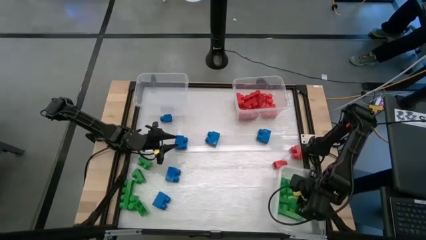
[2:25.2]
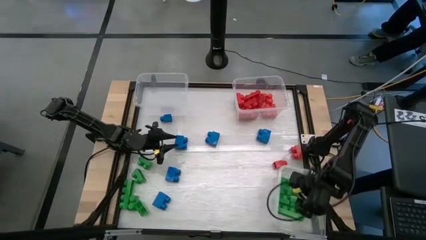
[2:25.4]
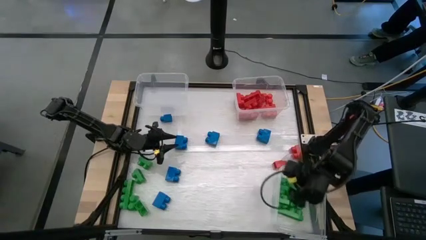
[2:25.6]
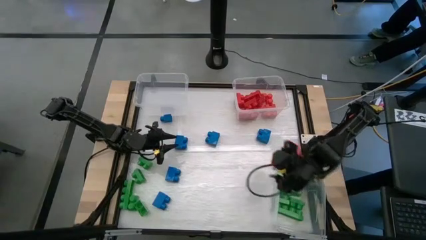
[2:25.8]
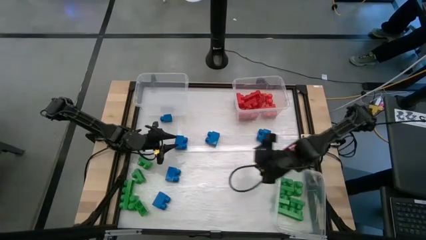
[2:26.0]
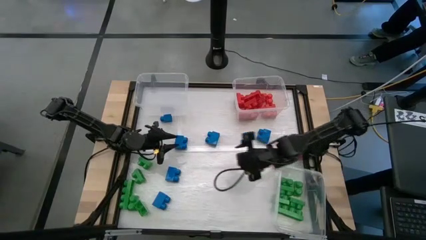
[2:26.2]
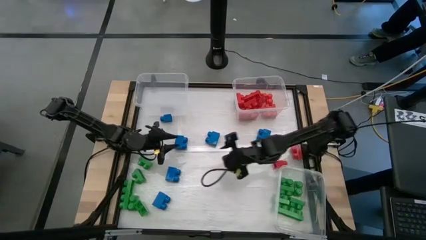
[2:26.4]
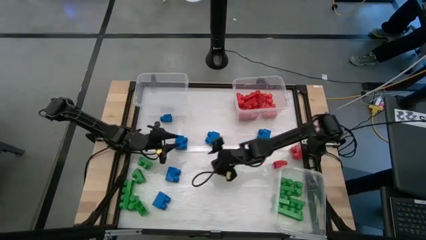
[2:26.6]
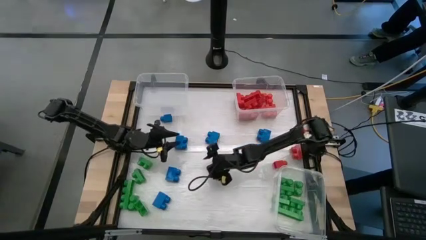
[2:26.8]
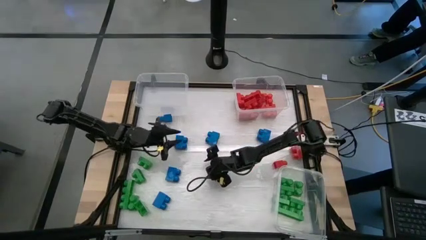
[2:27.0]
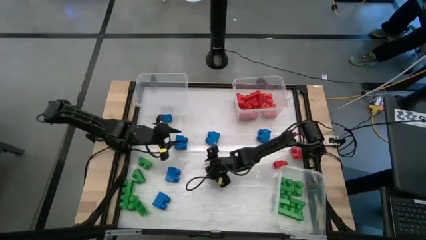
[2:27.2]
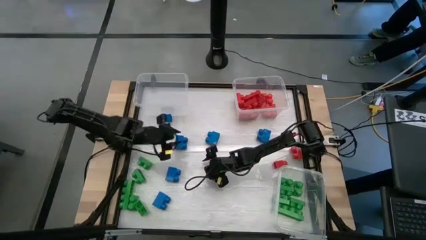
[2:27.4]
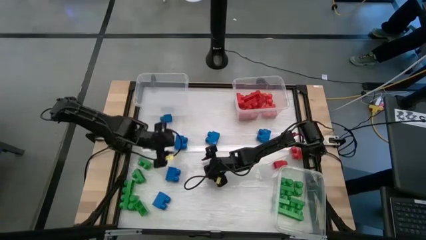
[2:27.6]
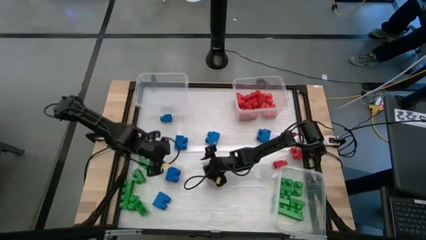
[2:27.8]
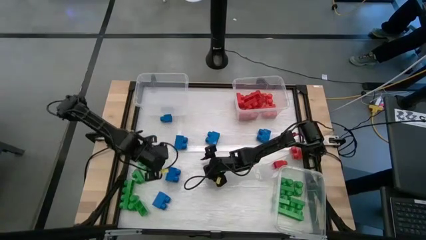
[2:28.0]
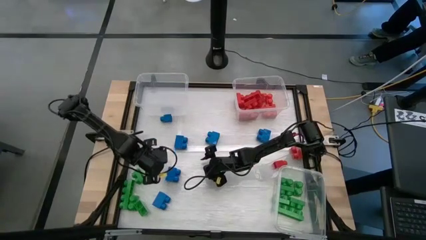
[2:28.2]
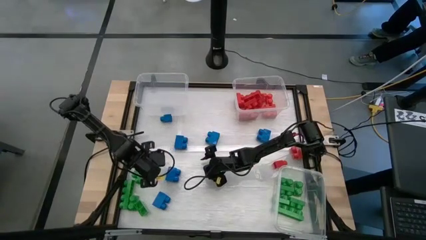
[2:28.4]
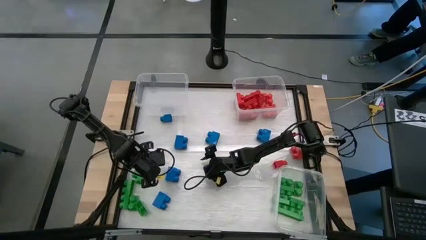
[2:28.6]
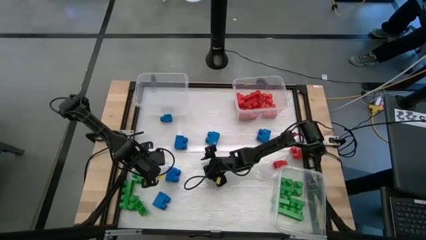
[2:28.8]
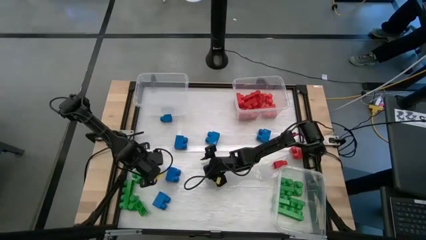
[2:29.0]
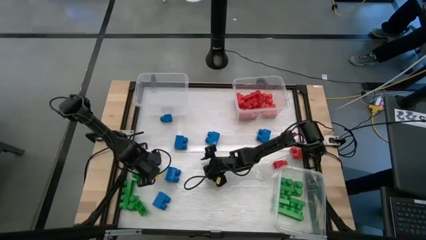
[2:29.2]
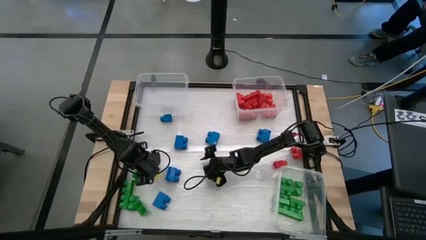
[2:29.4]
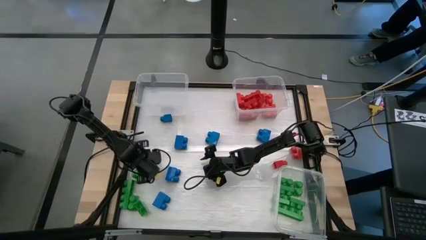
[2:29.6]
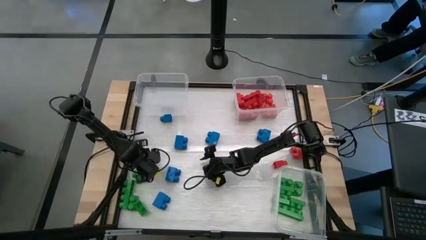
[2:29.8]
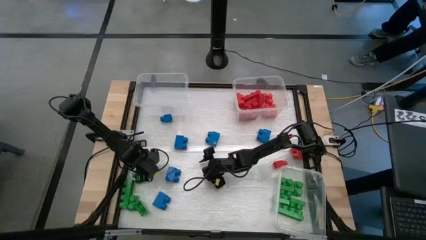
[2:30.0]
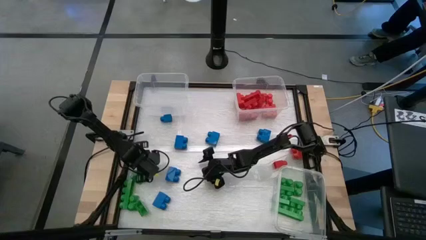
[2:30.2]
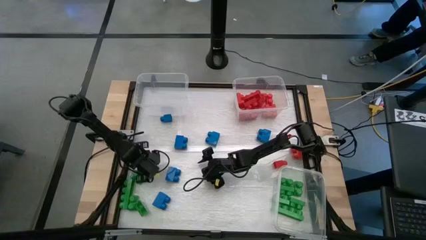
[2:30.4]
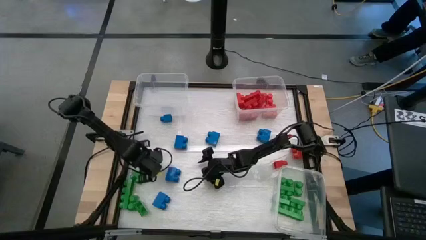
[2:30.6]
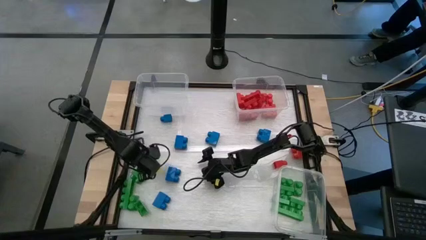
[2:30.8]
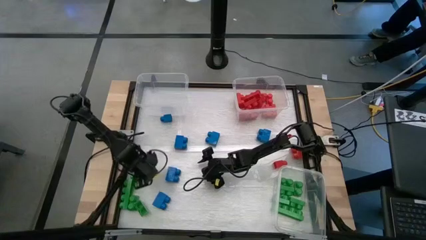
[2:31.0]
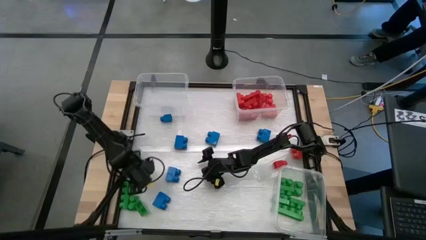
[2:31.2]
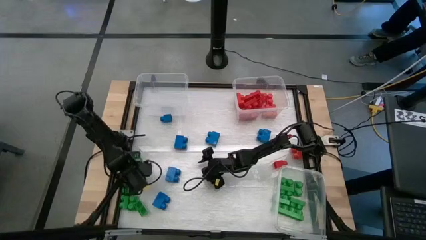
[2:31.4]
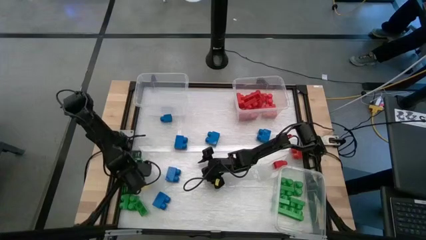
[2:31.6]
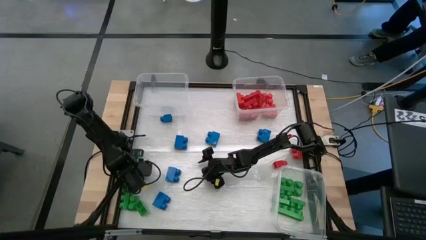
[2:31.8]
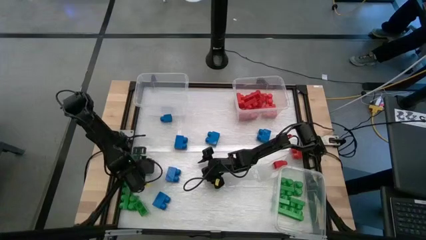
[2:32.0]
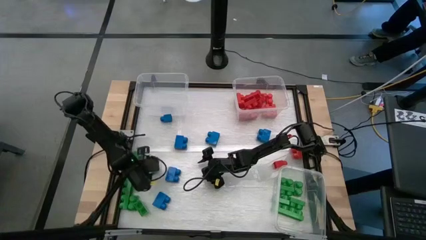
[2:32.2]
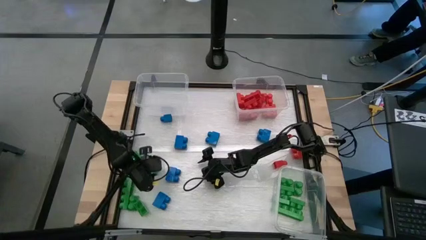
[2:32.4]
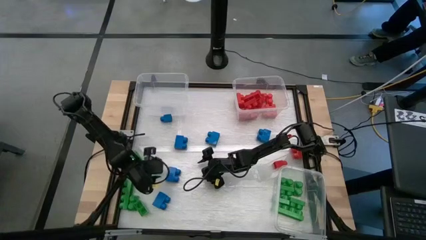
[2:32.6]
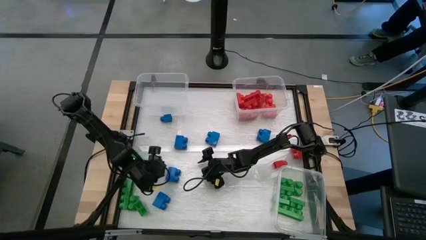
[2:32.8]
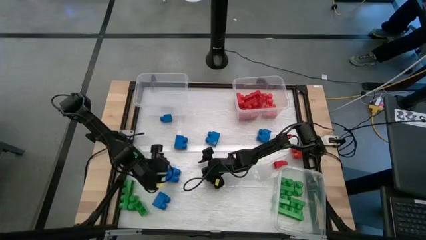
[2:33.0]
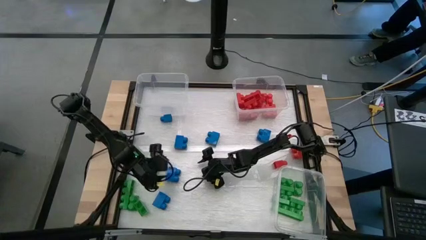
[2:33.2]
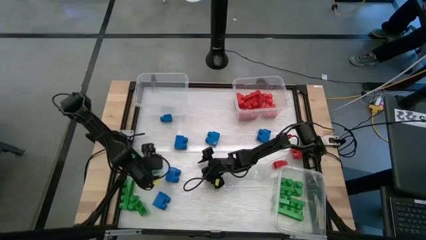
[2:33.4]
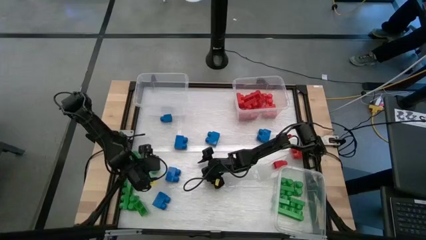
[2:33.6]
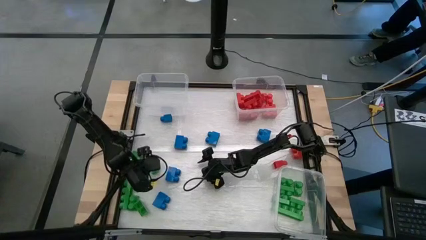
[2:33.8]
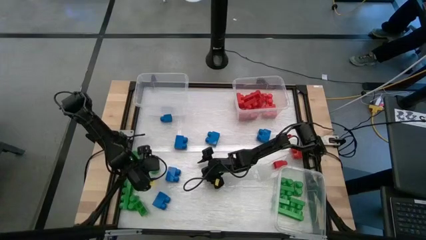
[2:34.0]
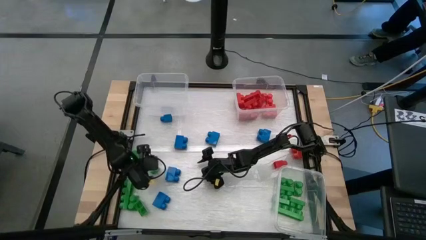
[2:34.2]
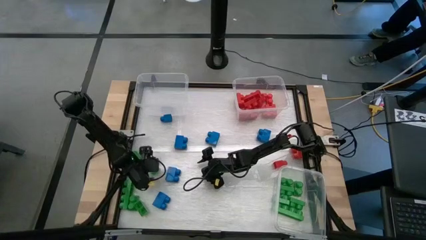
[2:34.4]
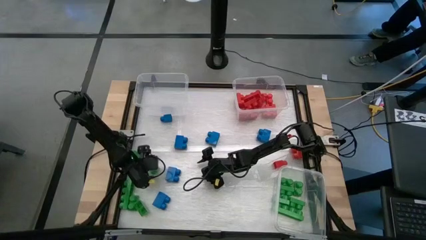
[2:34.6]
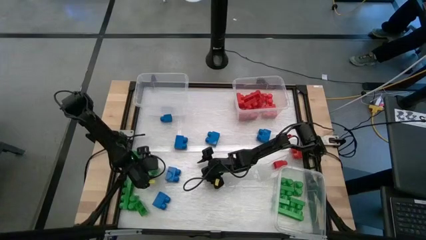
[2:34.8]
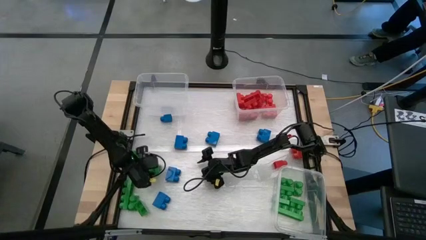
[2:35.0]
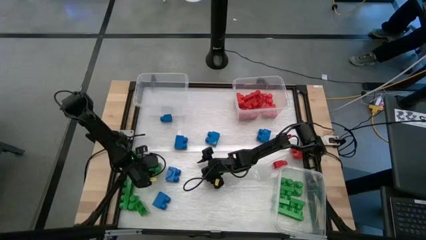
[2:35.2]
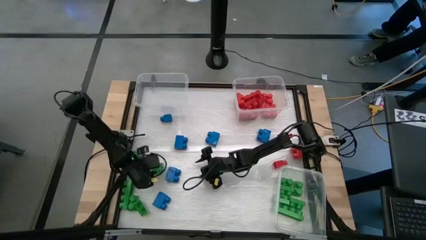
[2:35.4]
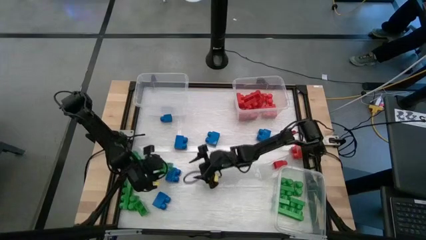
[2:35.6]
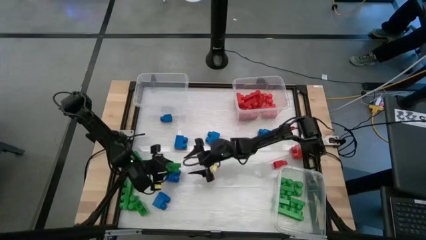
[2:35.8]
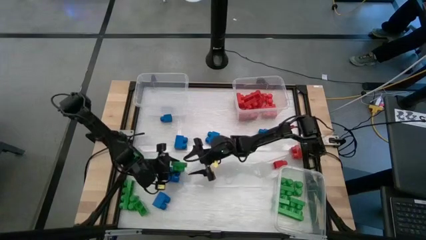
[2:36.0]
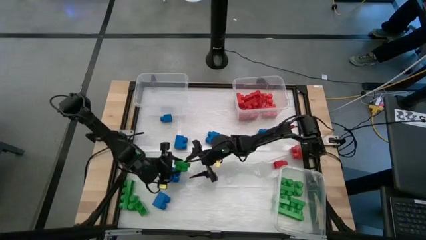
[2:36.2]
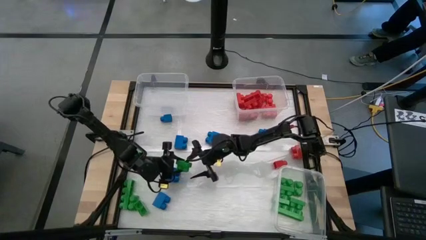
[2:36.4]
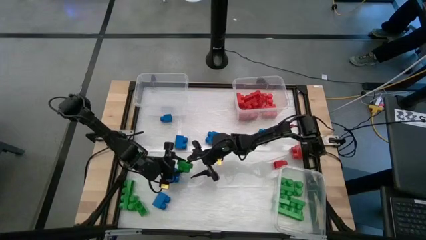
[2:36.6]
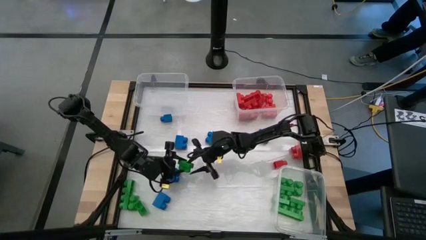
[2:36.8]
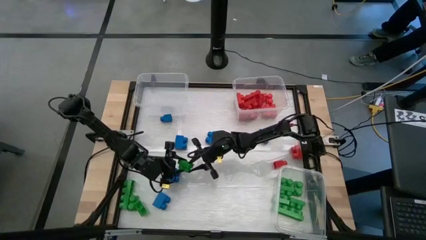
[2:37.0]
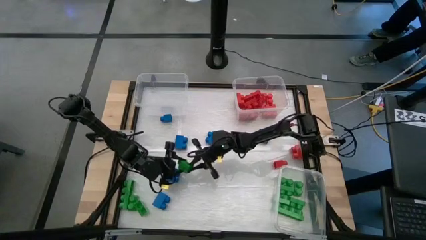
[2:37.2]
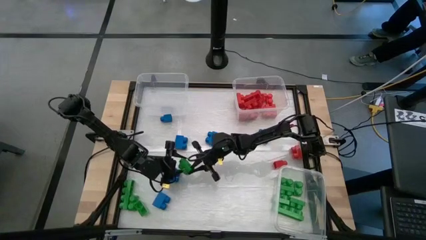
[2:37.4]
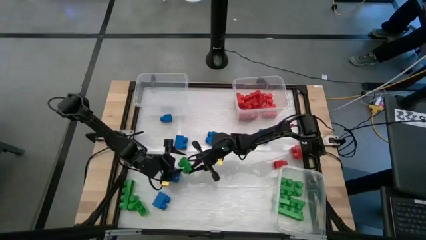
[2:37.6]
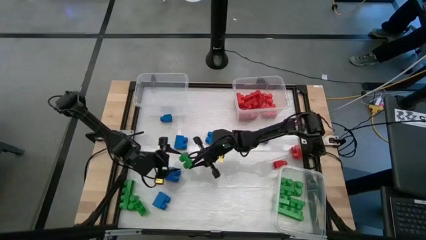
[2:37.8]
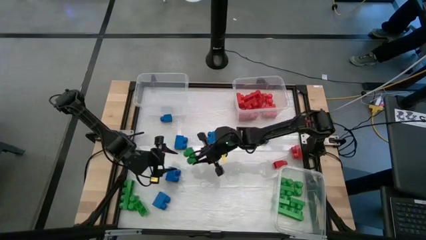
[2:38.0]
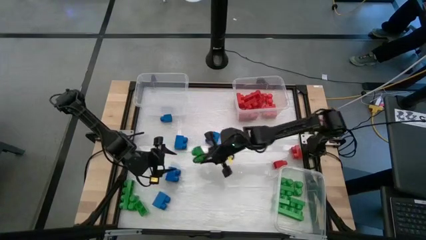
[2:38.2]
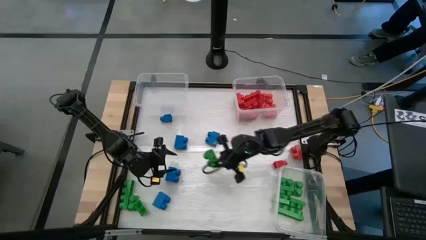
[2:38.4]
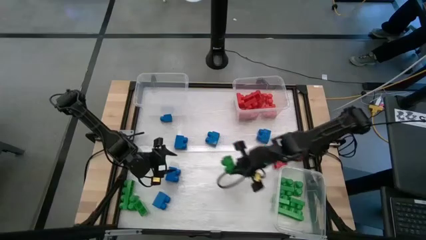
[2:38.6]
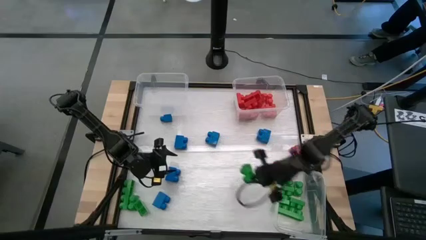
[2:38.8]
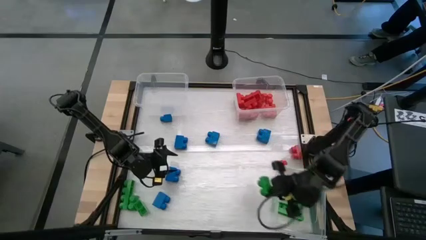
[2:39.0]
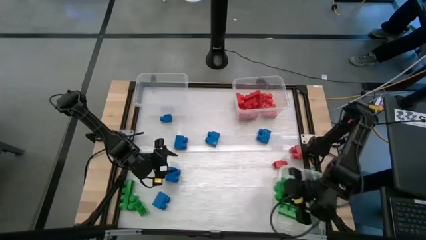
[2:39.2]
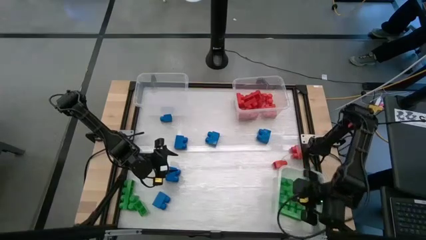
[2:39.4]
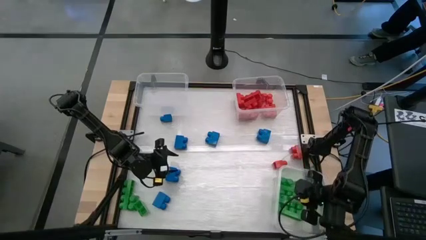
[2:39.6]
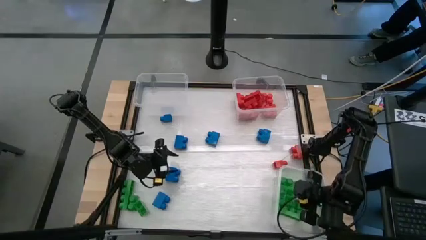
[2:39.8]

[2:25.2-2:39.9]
Task: Sort blocks
Put the green game piece into the bottom right transparent bin

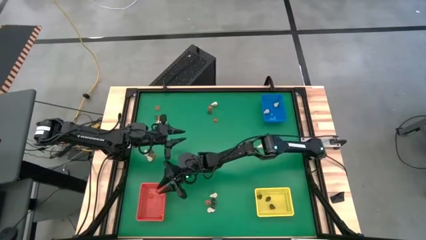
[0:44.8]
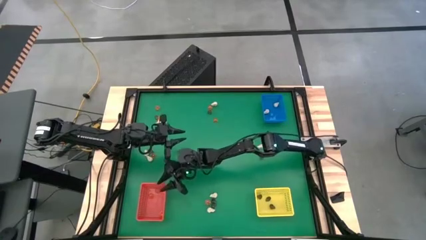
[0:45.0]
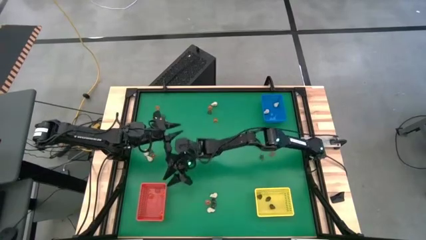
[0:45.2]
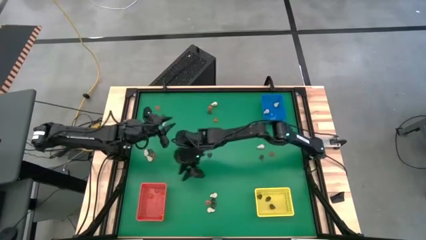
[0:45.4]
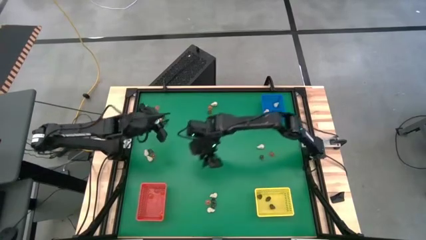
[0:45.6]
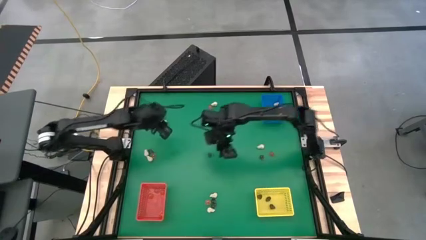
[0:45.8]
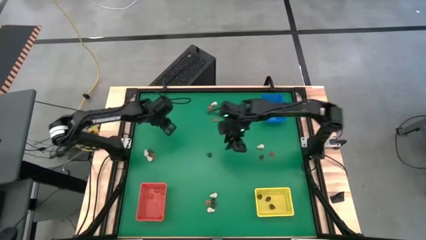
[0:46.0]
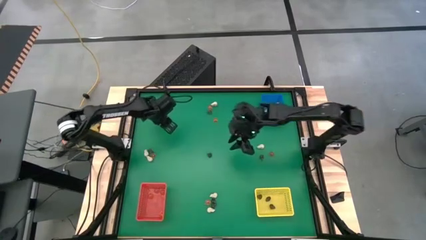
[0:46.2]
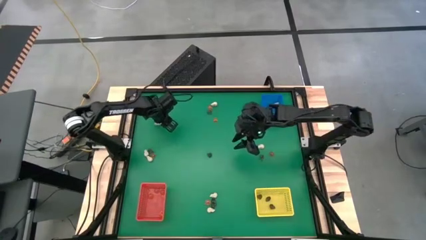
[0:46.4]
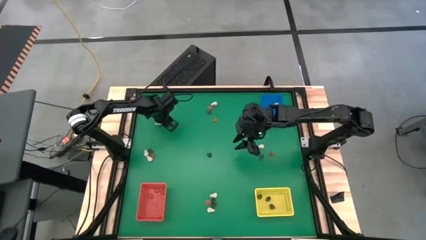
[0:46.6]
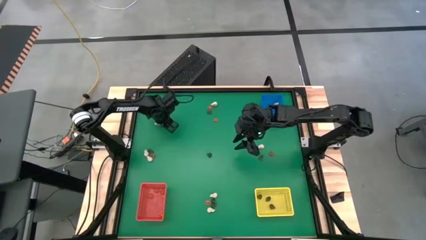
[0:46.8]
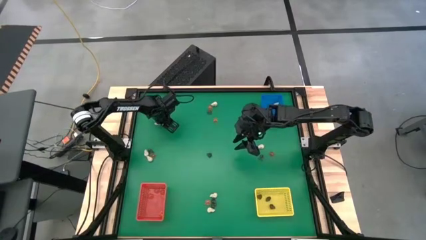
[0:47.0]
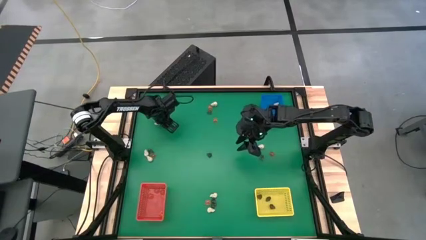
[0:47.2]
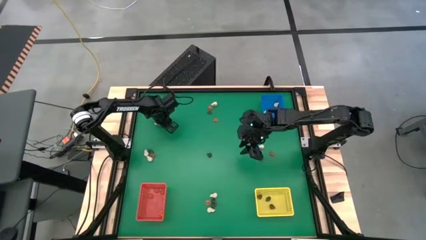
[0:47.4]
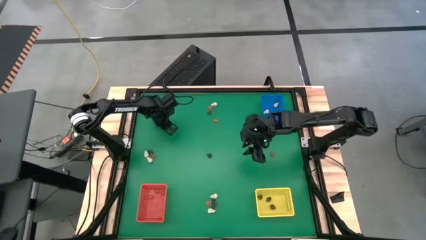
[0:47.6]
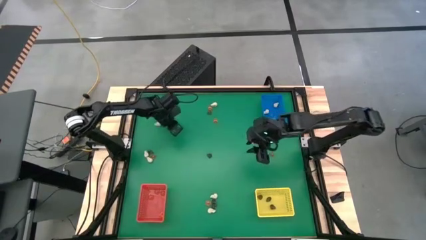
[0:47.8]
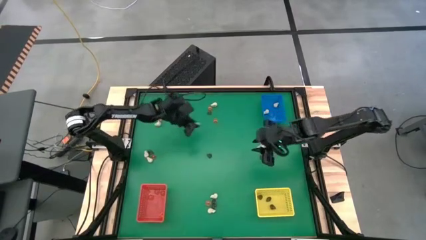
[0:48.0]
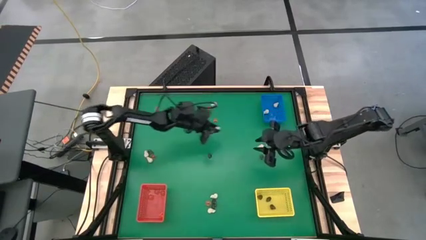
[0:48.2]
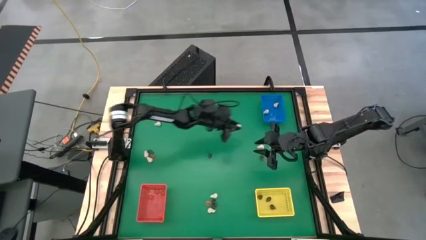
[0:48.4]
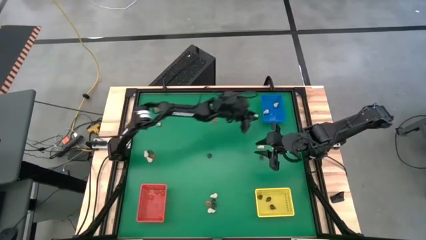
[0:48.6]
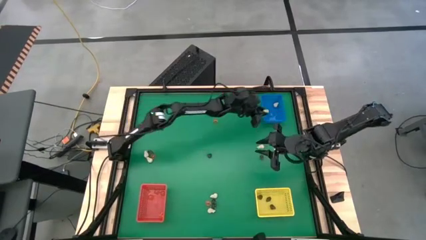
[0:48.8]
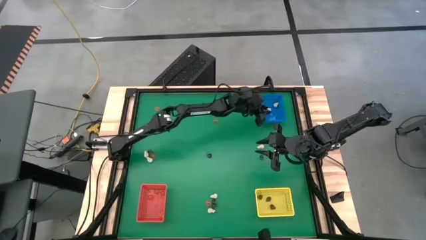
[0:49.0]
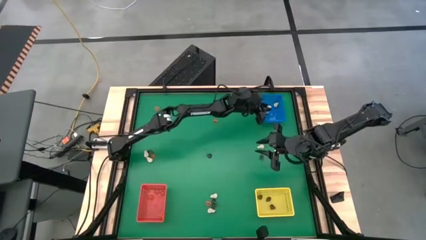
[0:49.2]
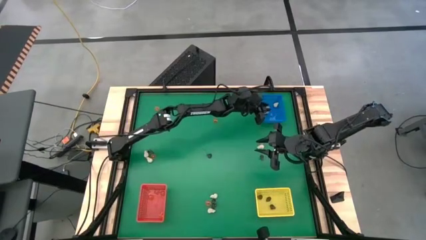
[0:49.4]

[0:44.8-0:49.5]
Task: Sort Halloween decoration
Put the white skull toy into the blue bin
